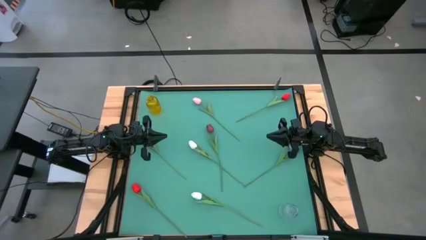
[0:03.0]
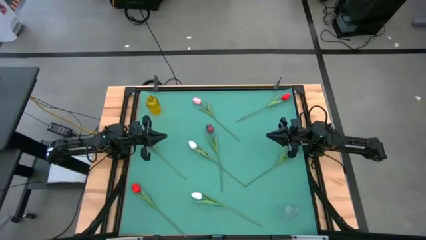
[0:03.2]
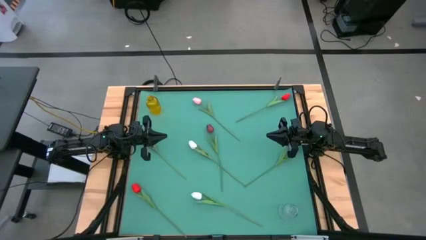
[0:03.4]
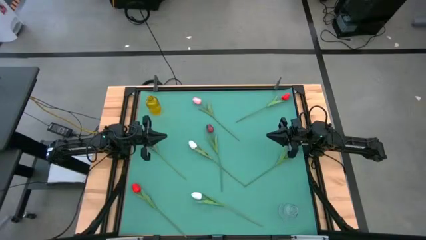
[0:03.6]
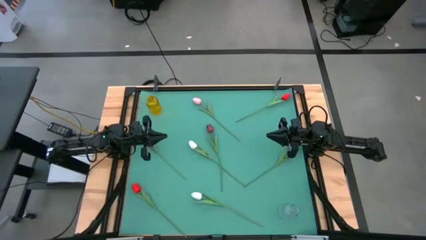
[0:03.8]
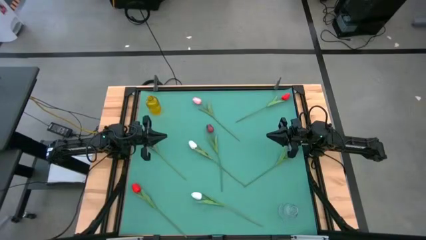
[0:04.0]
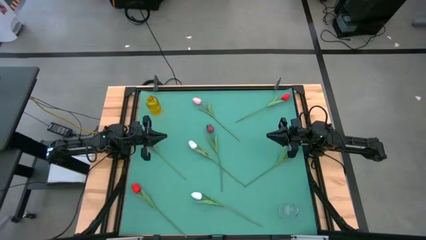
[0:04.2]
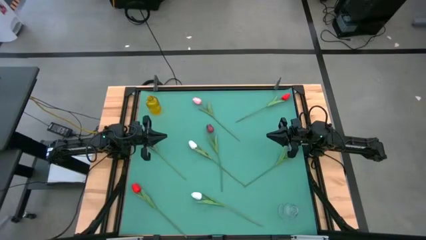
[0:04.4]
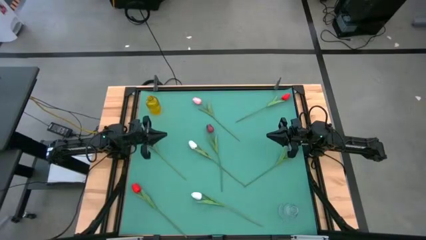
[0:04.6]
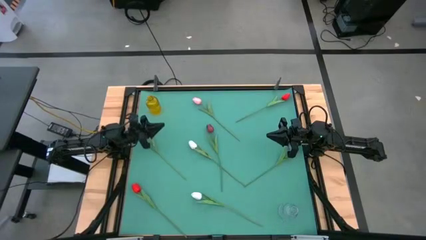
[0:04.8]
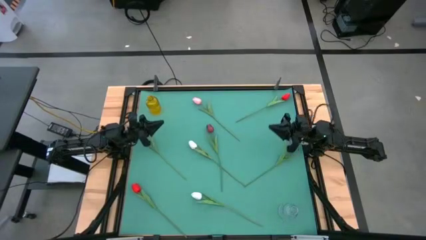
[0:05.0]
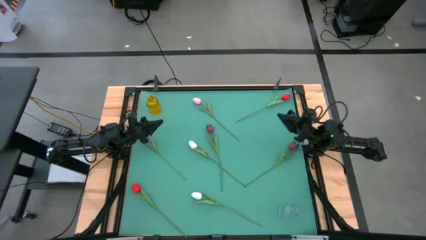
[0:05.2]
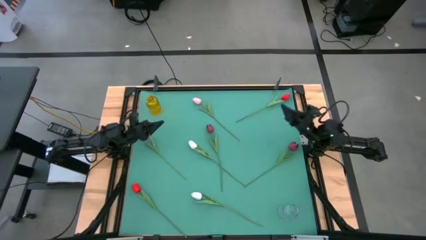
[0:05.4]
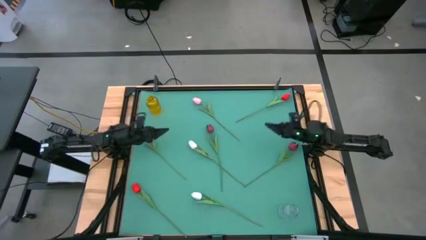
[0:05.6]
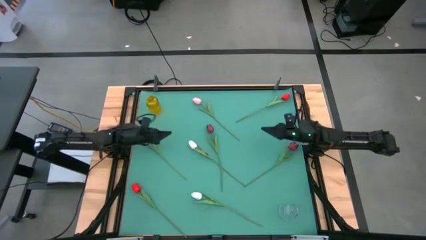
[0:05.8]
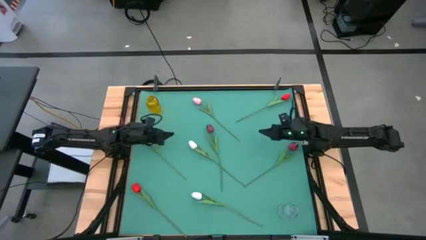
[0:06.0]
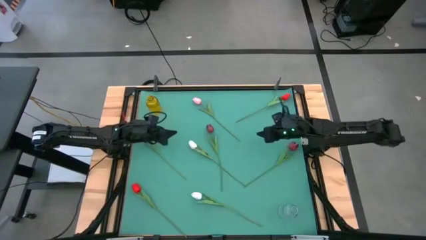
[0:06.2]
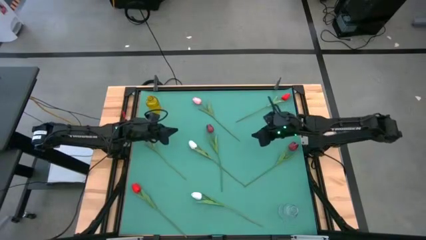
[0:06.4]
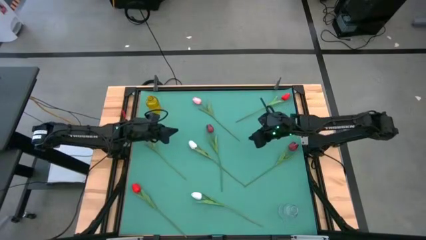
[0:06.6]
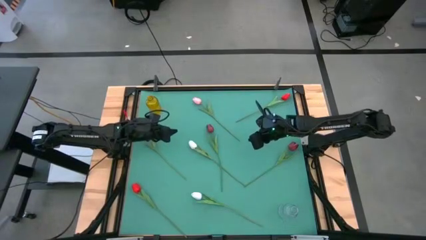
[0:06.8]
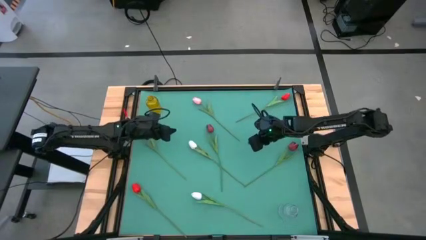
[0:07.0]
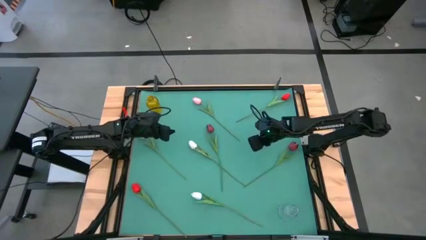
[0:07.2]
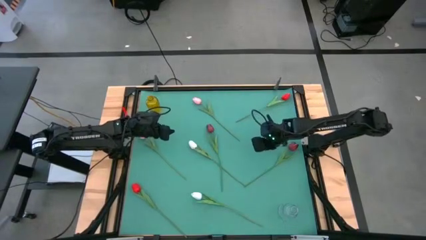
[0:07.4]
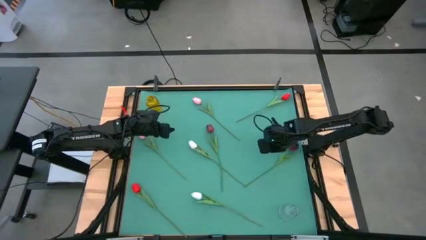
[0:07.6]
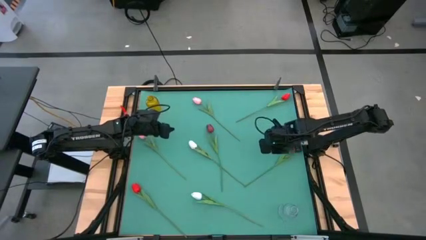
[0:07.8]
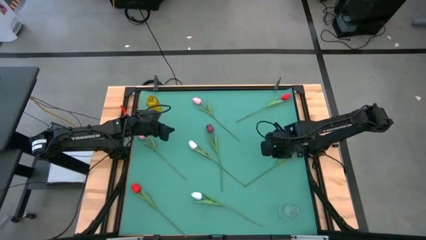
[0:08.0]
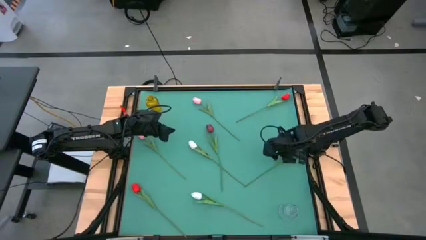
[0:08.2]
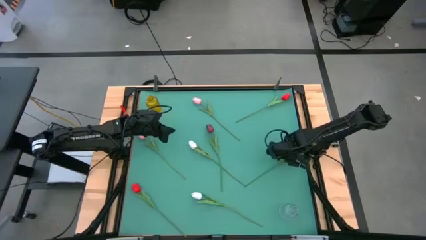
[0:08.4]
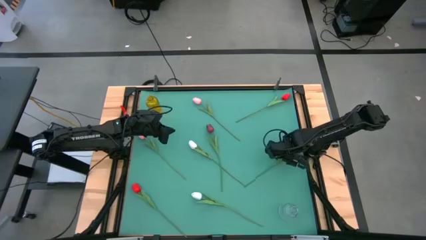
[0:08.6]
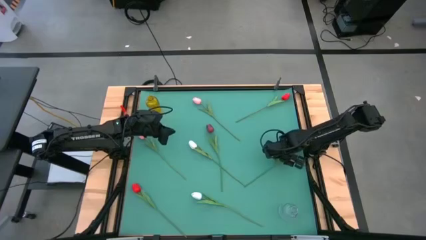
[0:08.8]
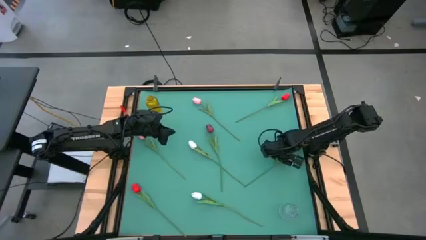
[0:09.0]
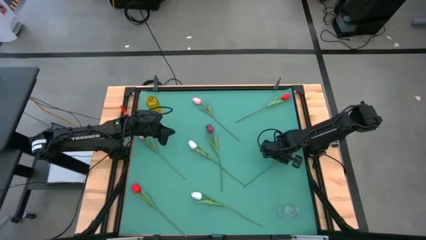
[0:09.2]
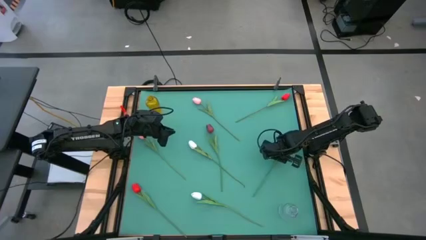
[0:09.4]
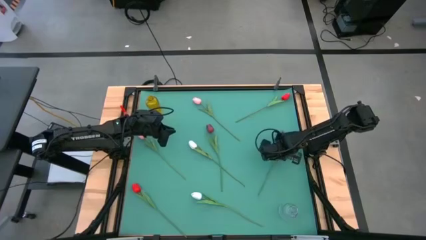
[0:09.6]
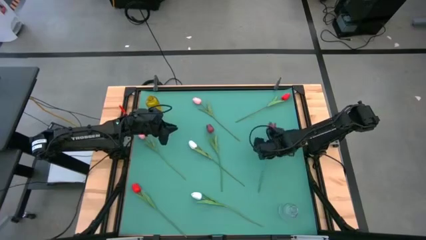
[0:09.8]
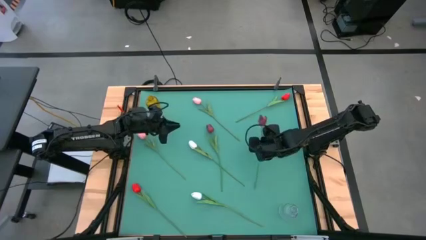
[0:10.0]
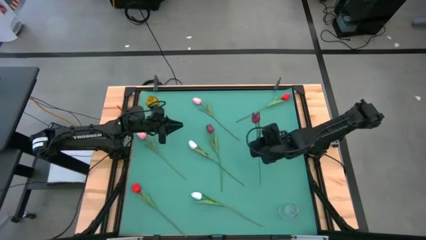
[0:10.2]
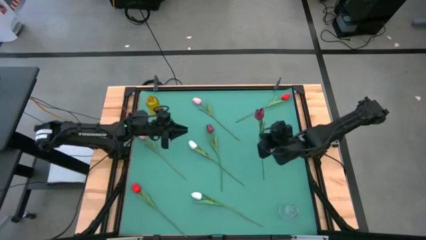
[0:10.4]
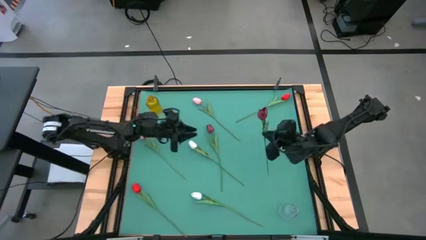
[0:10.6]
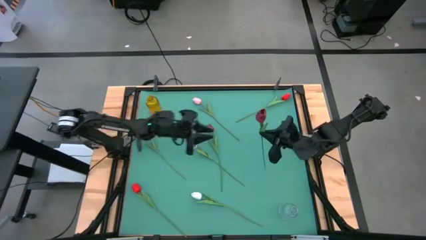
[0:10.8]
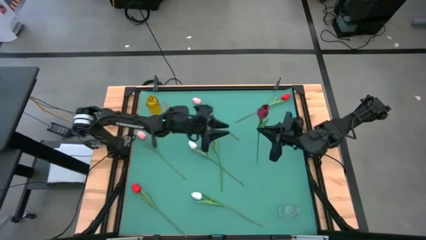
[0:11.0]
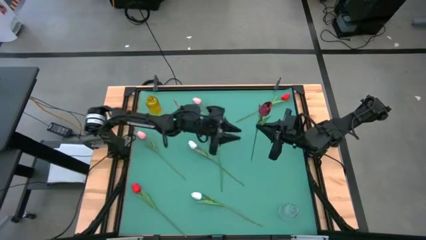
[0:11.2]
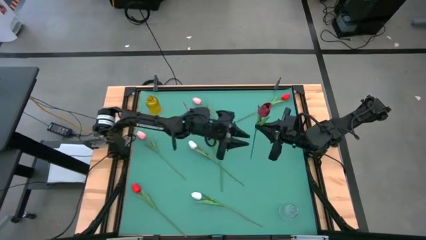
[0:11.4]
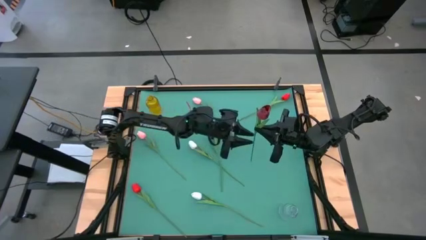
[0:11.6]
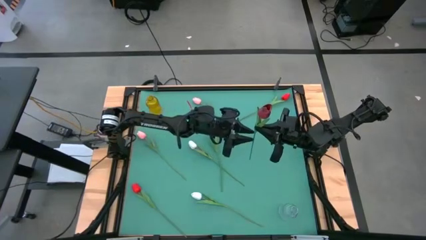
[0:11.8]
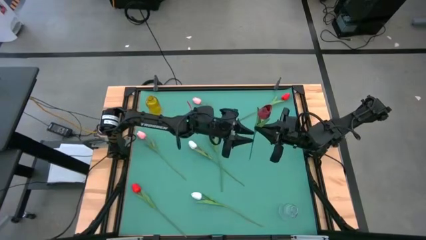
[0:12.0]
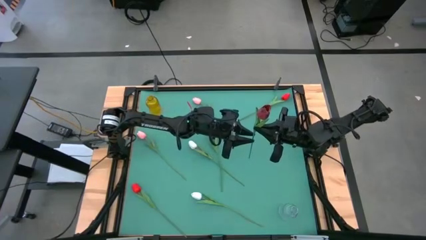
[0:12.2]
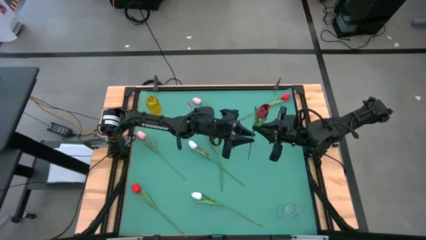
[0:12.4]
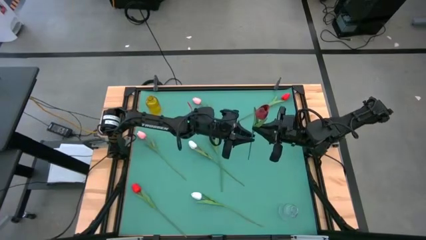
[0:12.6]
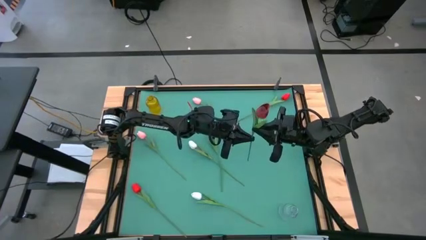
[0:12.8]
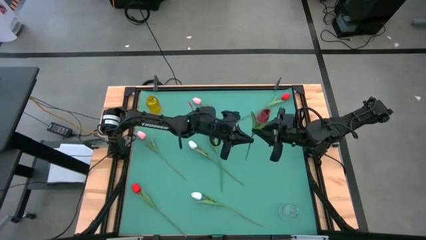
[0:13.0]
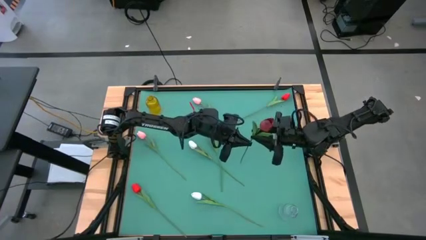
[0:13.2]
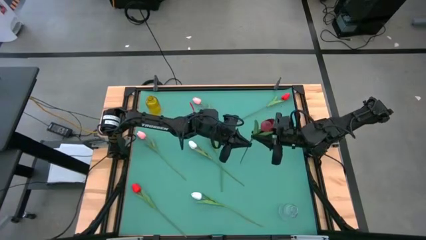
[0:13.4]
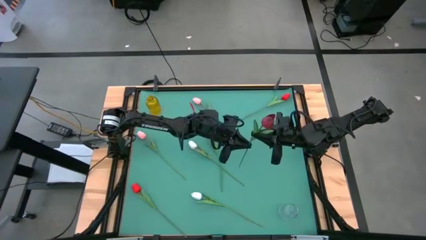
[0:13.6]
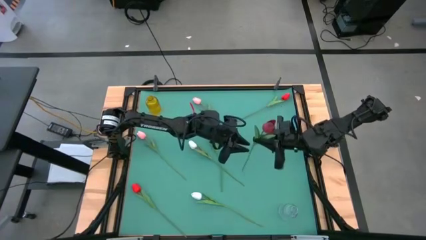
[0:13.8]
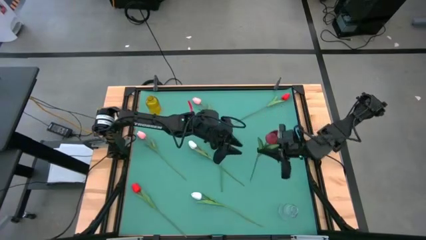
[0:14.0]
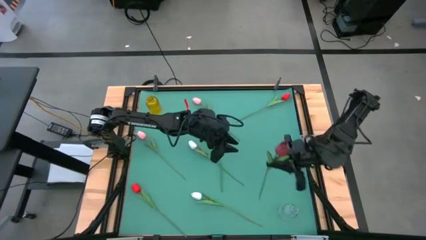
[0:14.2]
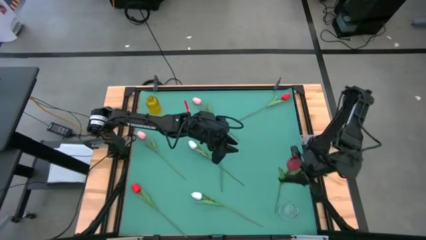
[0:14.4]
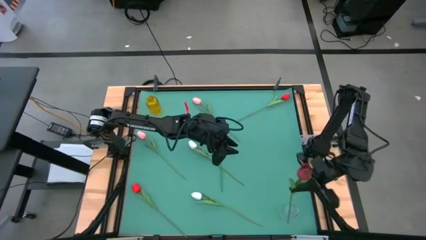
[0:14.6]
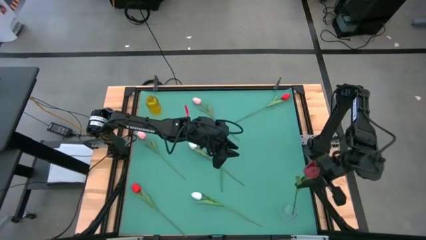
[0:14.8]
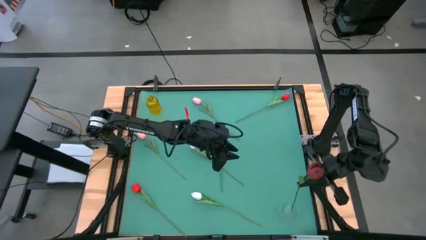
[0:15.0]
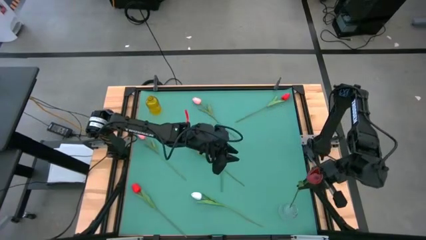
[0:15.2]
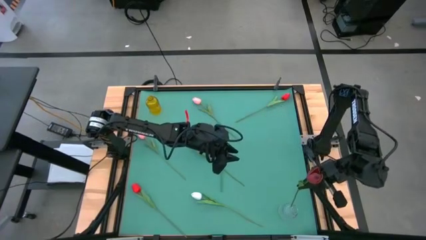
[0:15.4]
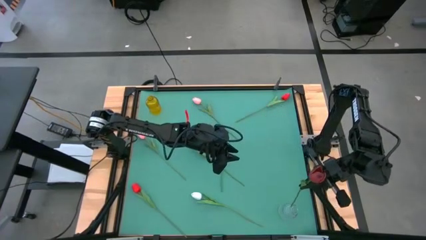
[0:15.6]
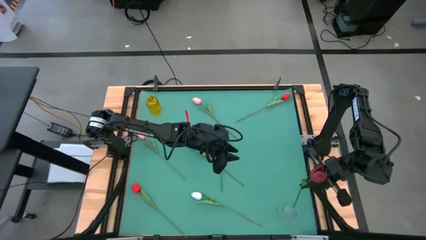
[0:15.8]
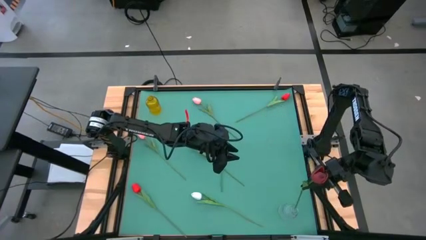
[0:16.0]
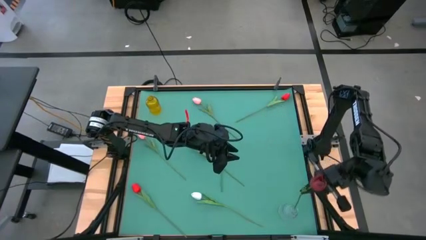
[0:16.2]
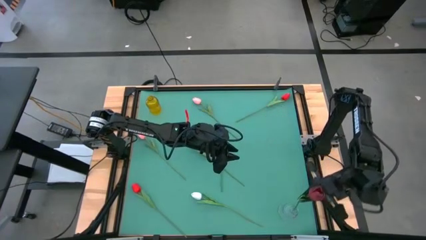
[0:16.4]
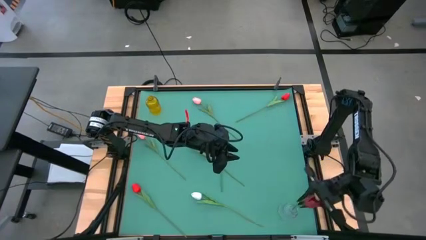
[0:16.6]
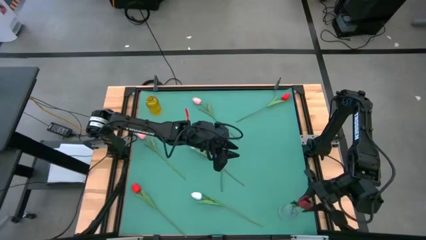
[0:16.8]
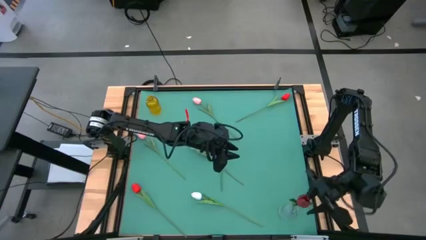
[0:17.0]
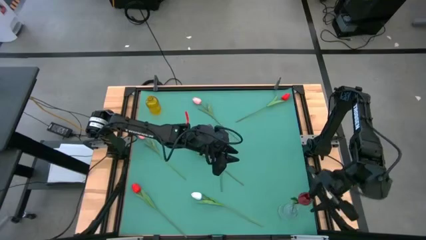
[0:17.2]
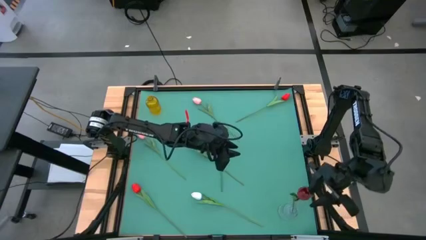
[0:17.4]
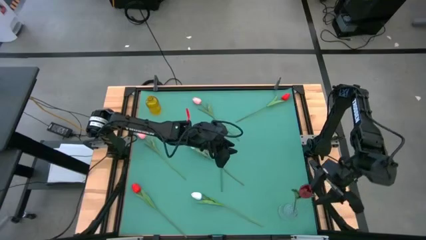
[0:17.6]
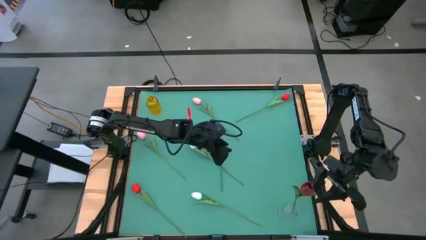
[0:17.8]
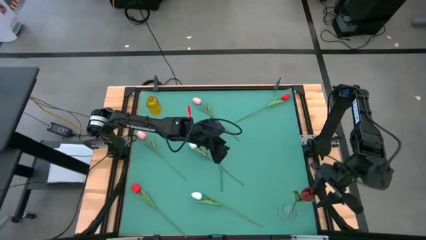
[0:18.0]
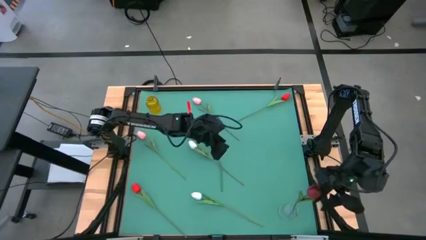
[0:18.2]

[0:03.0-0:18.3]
Task: Sort flowers into vase by color
Put the right dark red tulip into the transparent vase
